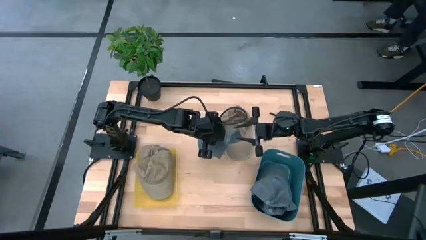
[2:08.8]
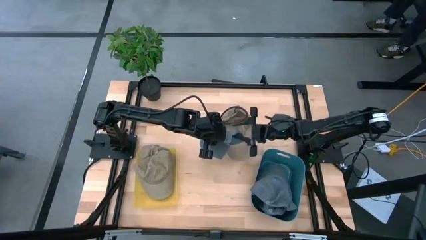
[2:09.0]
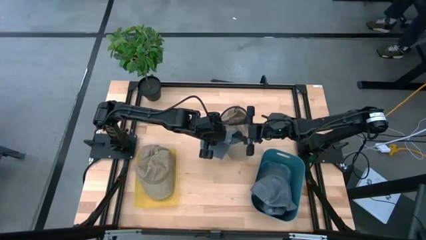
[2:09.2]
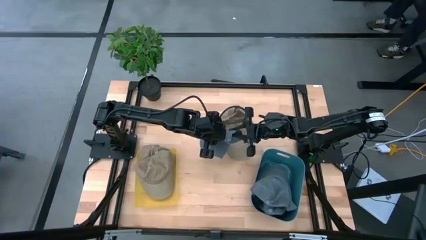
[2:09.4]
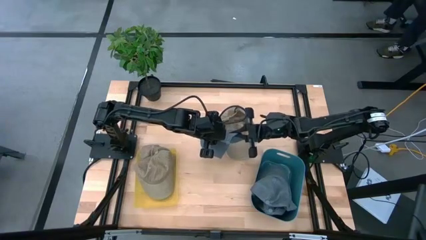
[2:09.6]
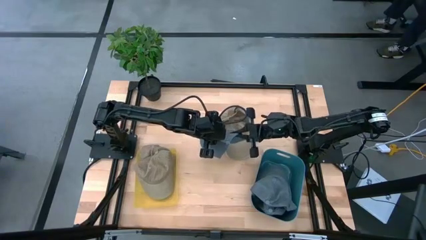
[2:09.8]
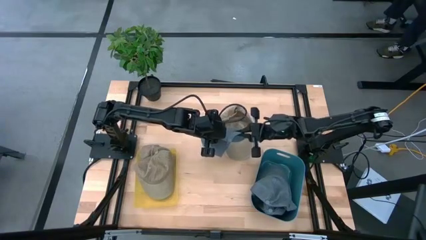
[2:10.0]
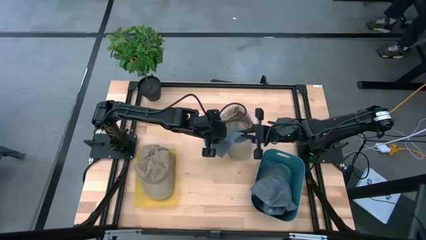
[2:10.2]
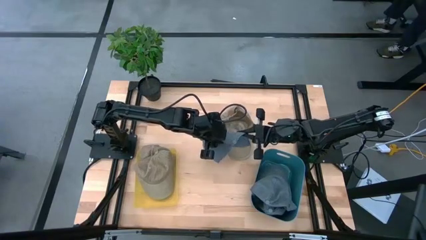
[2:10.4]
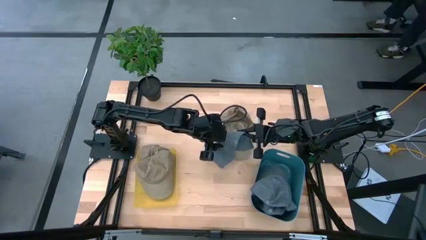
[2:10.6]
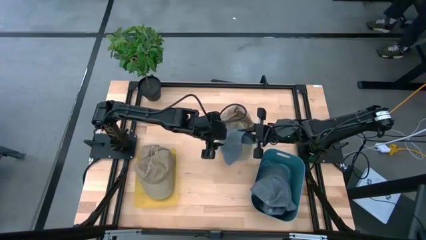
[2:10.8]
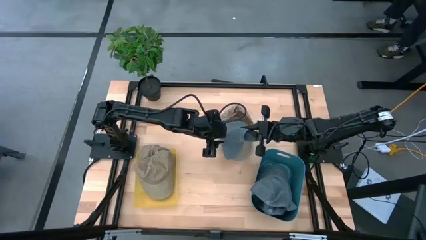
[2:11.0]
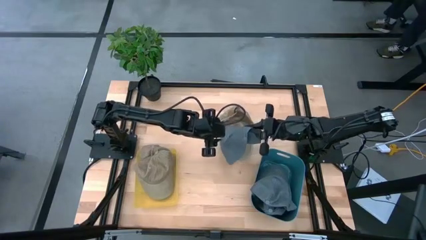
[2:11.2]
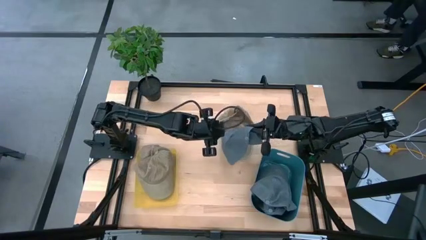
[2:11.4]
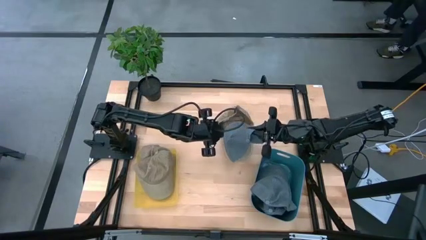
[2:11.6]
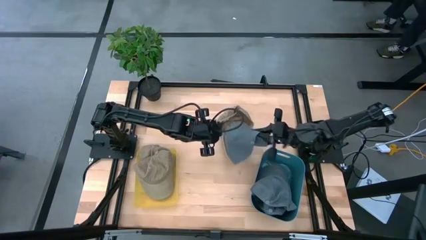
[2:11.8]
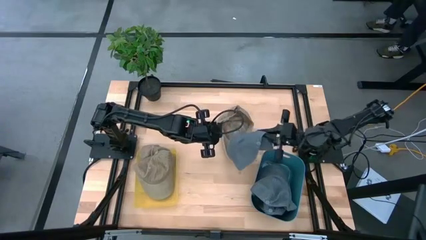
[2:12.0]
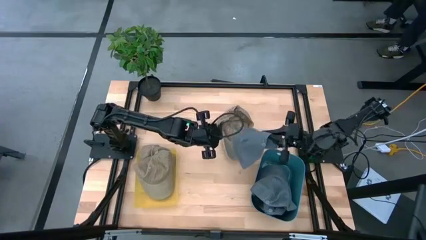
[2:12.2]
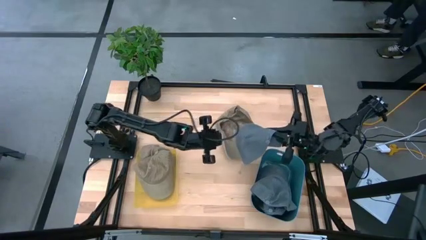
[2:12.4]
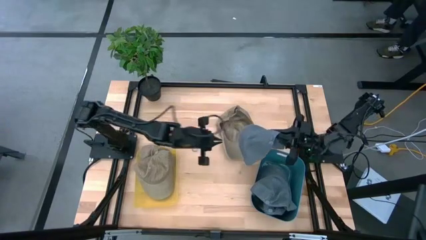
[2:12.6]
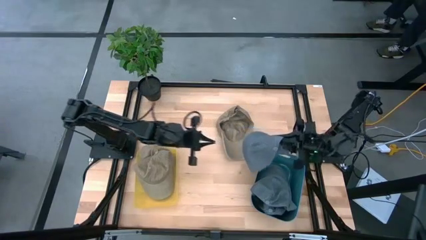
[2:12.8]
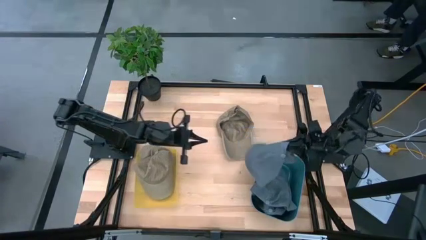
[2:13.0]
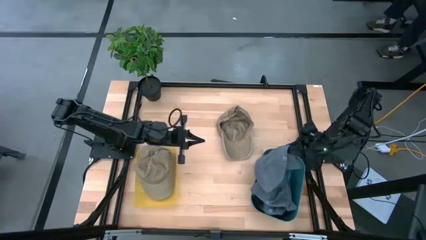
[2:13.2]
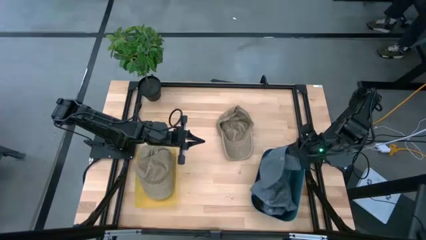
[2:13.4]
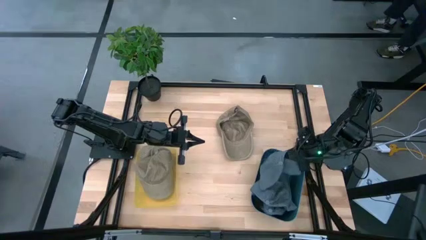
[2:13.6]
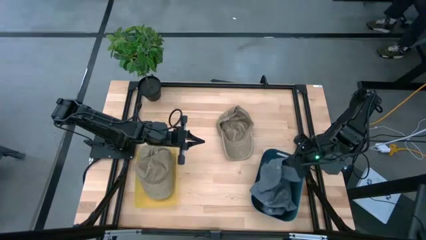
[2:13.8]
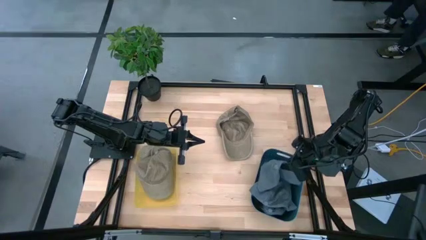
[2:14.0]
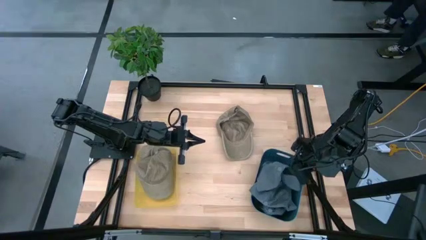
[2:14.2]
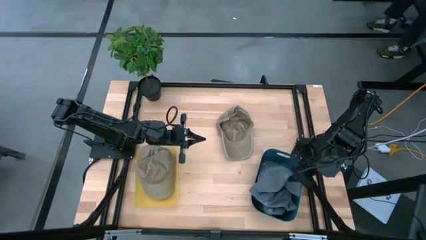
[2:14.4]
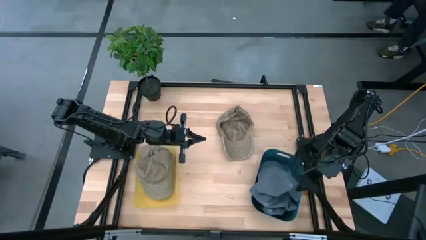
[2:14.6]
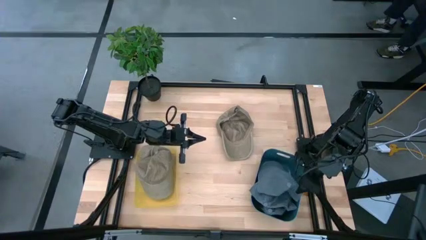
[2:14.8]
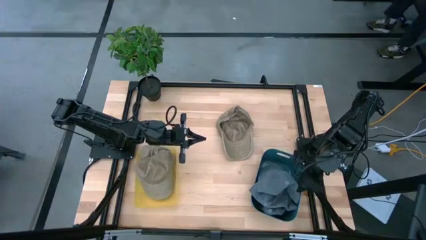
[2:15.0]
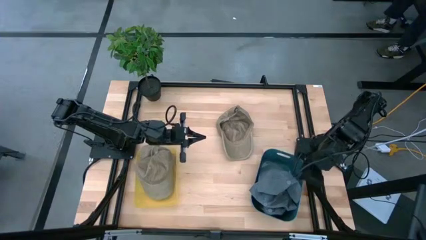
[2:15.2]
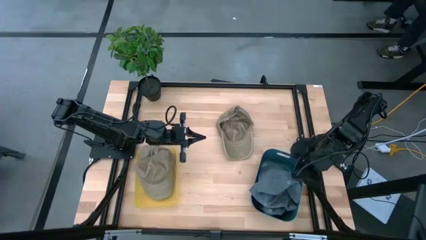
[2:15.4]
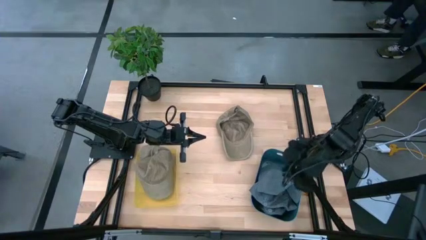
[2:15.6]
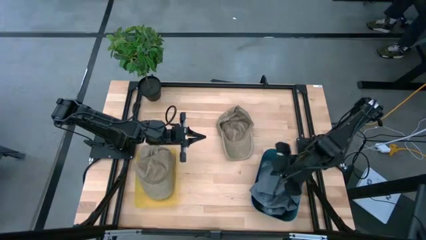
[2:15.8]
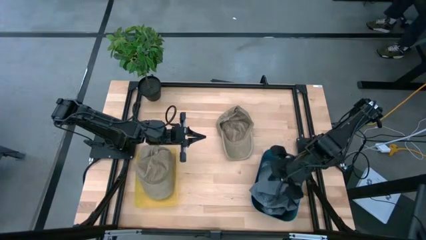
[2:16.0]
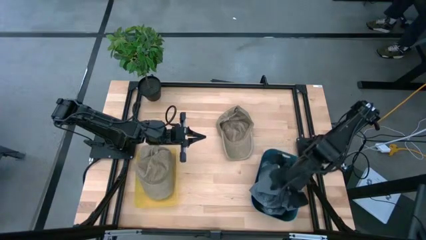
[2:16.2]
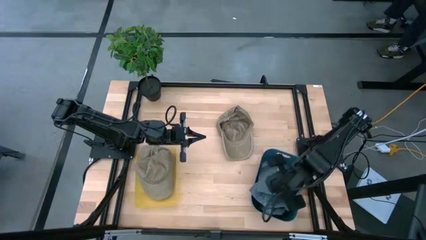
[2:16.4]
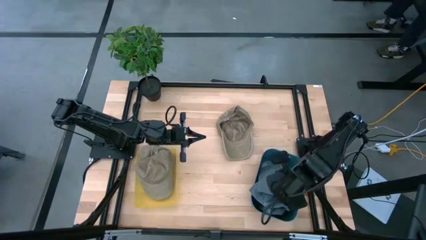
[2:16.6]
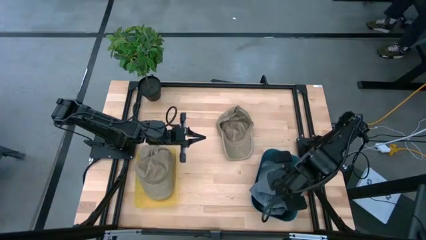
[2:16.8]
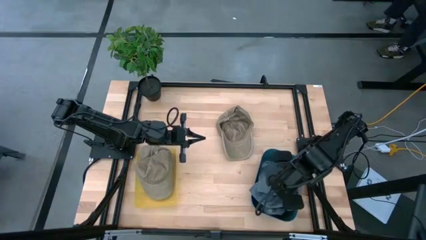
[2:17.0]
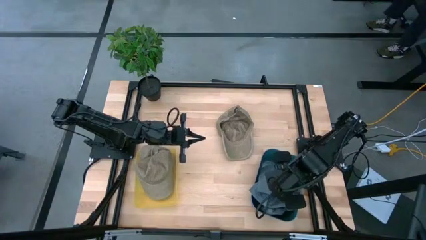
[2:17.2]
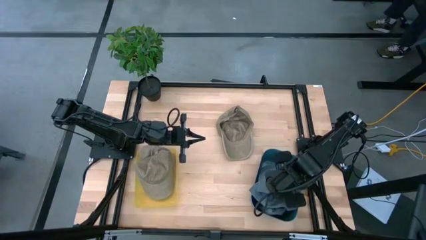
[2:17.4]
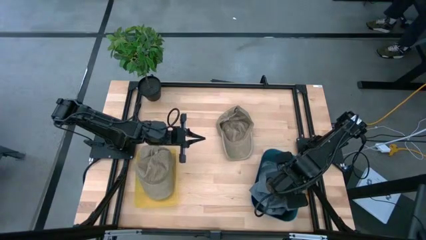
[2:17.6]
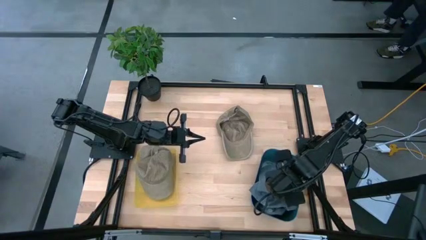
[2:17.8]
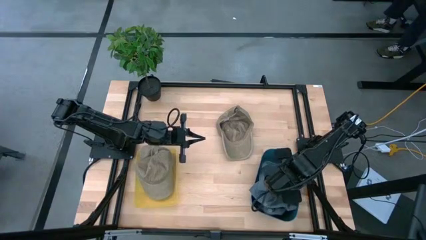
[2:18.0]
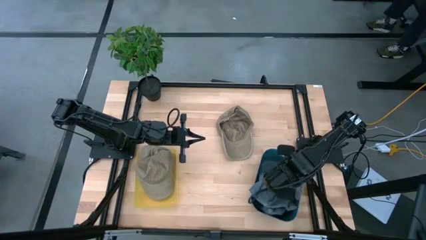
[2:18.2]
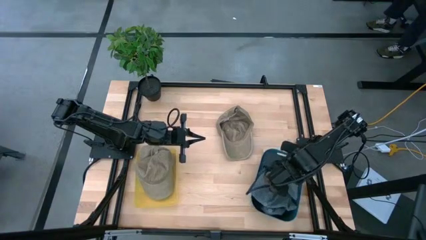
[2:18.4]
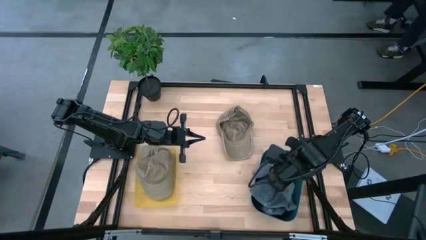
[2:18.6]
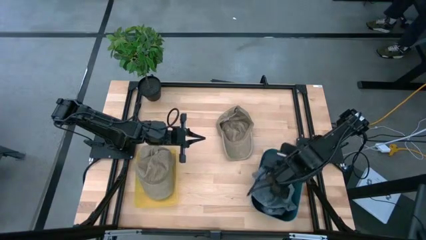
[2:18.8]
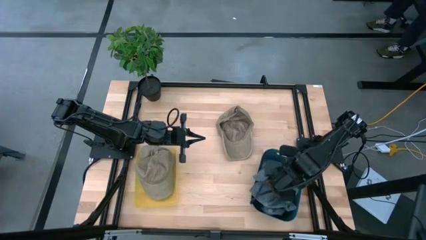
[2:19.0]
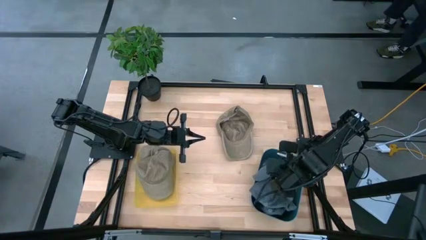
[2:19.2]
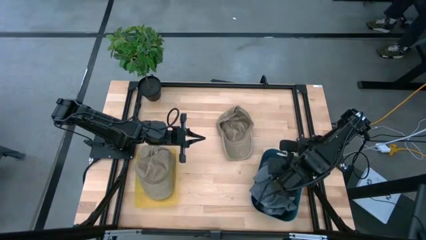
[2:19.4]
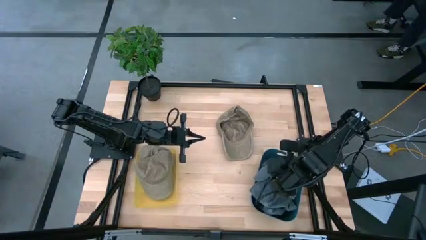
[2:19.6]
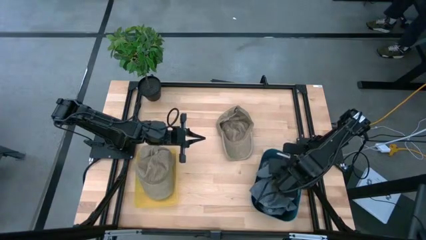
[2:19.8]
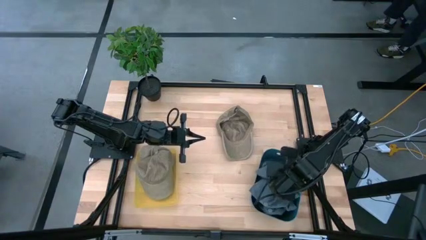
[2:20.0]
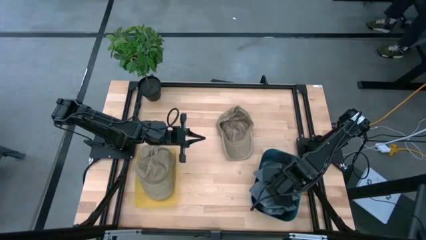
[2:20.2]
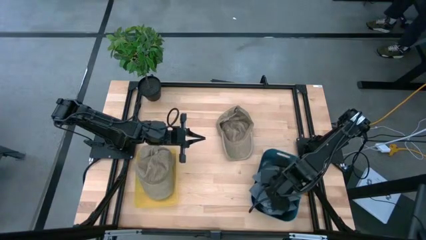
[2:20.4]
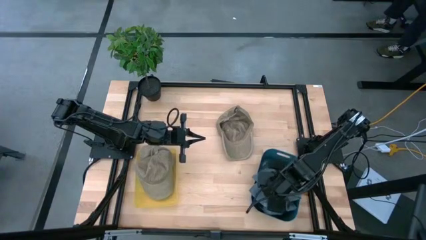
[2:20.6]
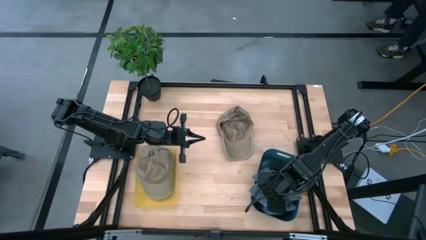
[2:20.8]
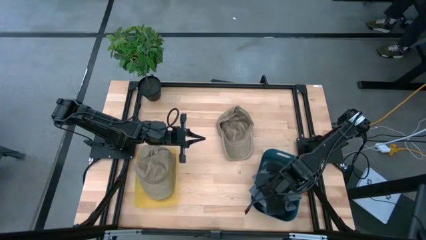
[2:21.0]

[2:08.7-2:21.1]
Task: Pick & Place hat
Put the blue cap into the blue bin

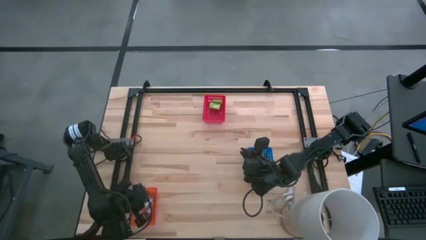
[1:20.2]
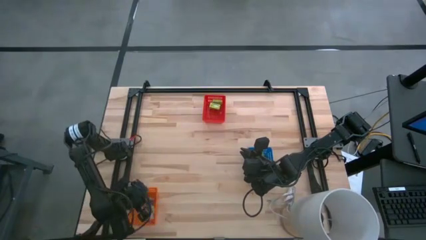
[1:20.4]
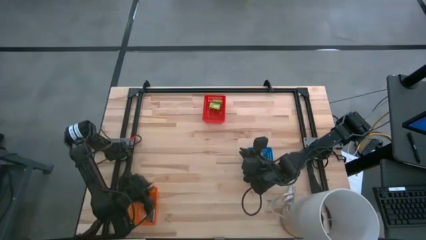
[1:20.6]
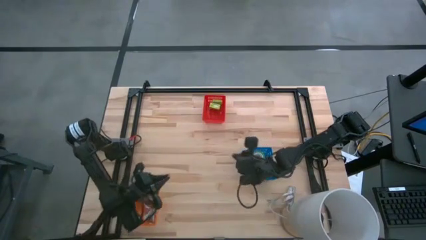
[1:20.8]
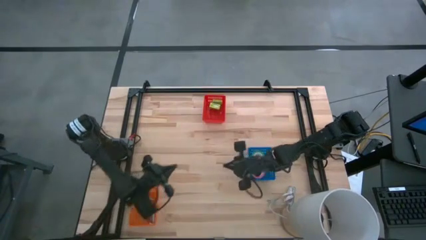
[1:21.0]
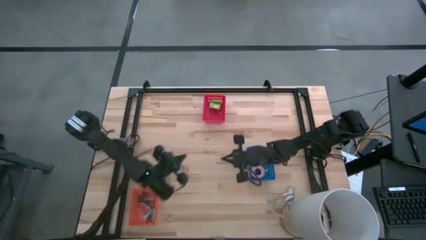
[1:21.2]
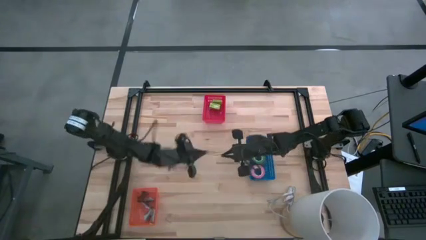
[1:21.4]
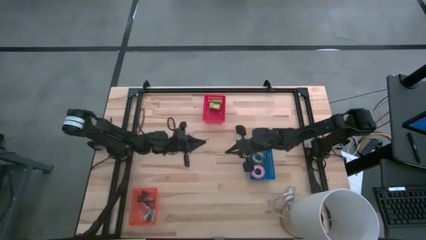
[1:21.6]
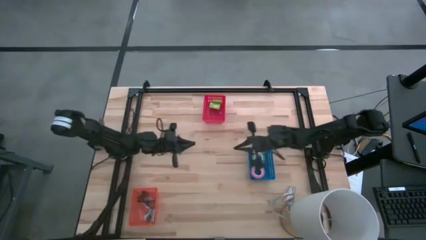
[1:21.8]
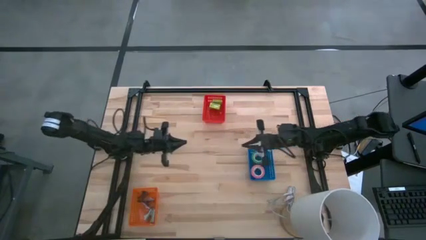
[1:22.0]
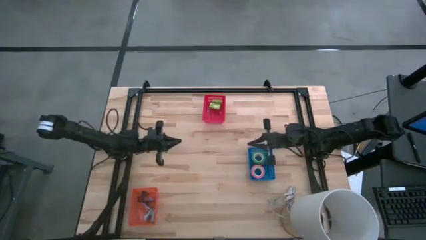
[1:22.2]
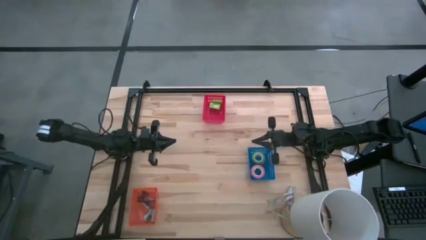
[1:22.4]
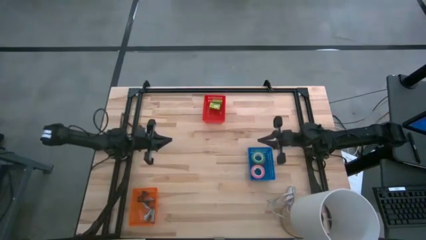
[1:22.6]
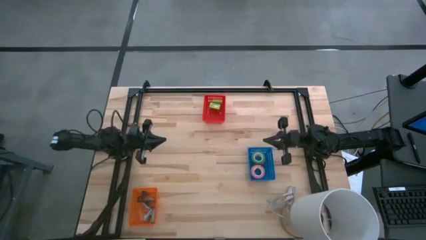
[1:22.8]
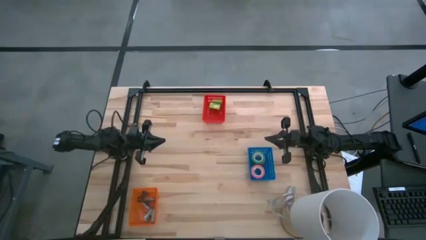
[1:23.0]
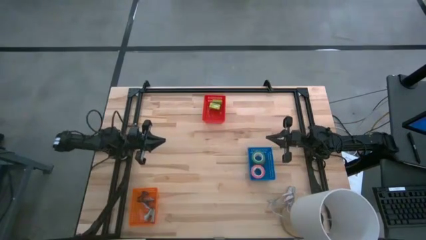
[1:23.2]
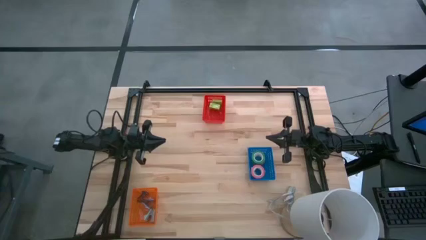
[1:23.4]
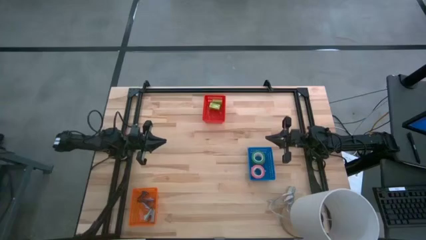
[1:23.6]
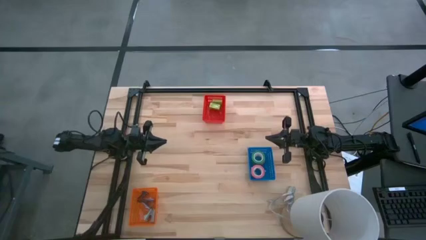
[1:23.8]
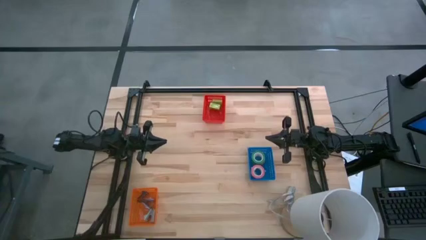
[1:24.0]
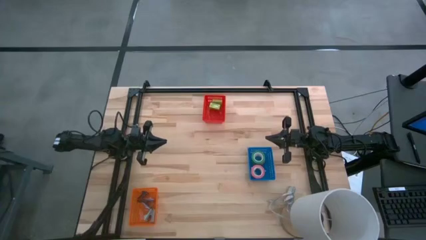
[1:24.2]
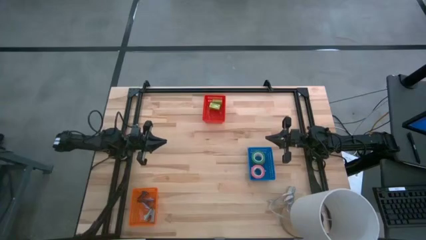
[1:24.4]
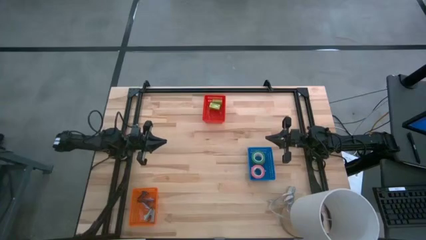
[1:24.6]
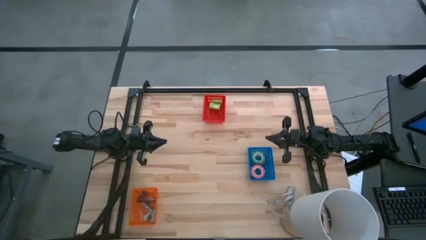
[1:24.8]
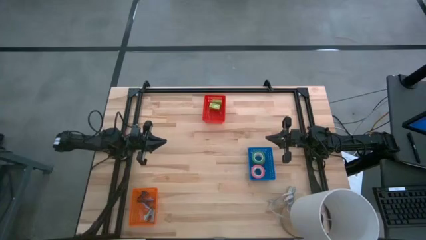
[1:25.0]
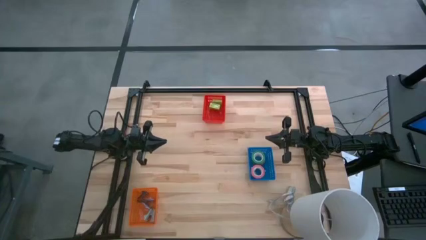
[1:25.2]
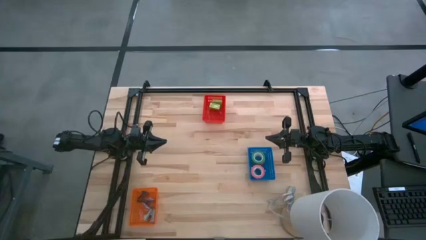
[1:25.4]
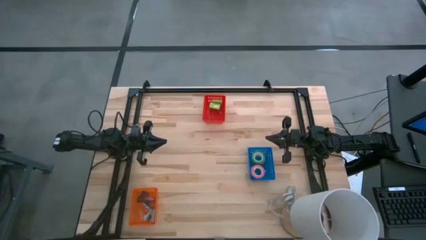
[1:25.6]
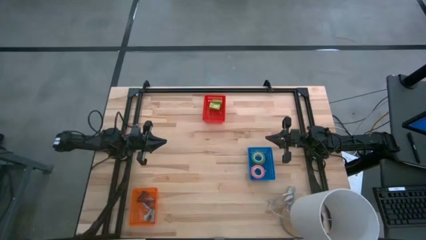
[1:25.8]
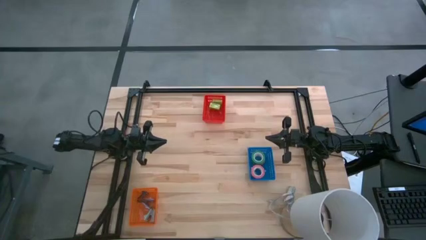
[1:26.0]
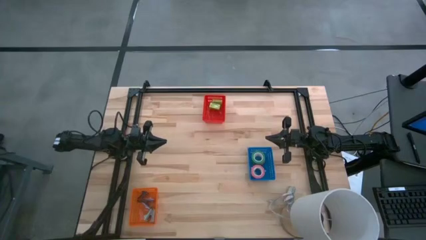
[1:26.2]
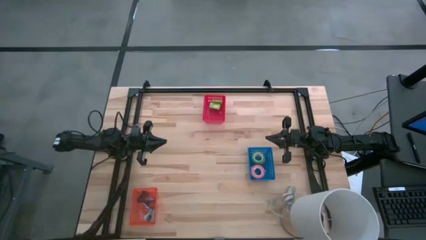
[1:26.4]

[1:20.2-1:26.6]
Task: Pick and place Stapler, Stapler remover, tape
Return to Home Position
